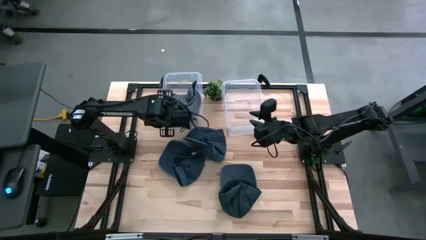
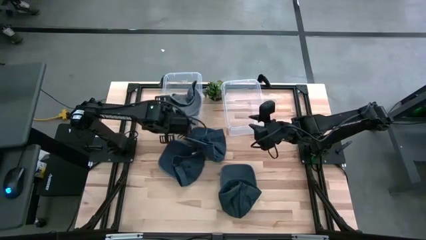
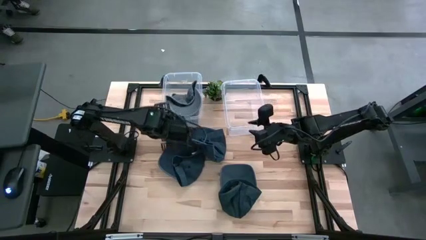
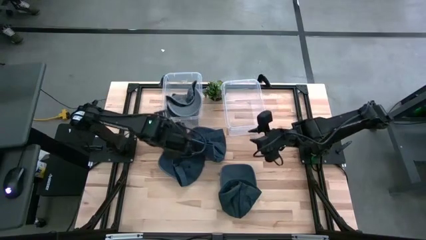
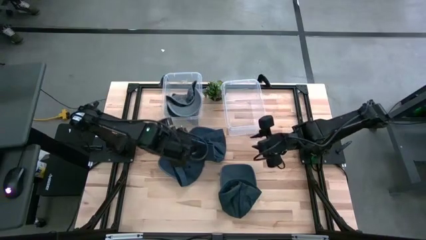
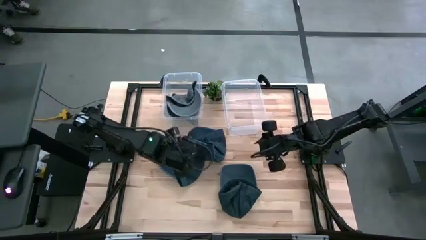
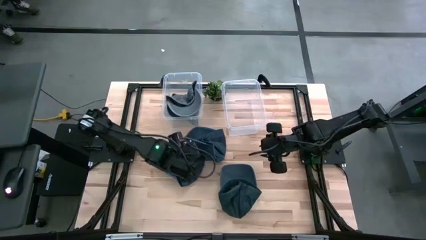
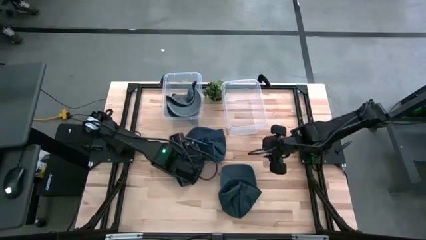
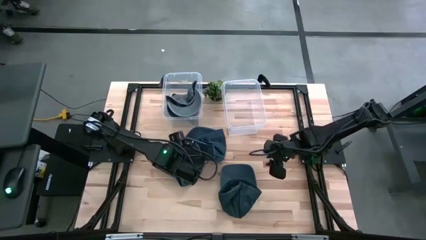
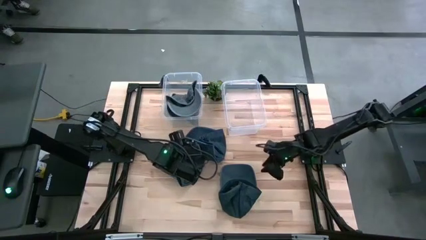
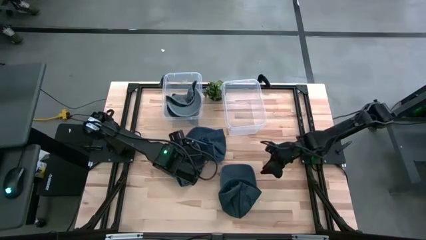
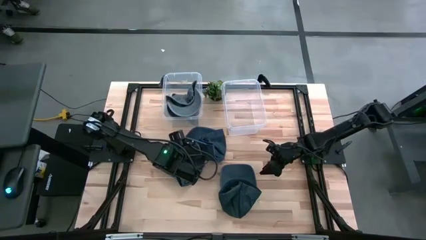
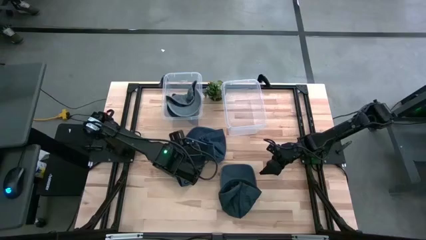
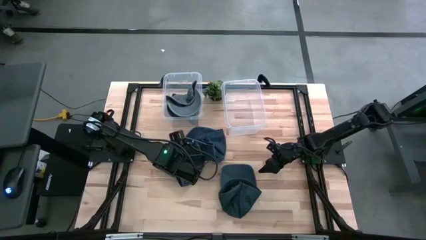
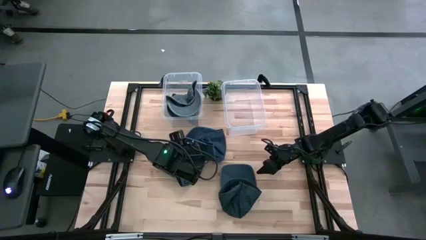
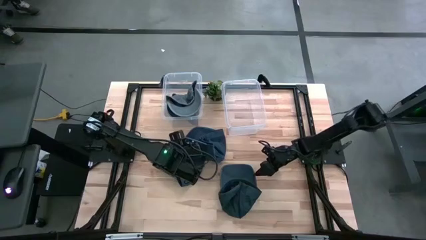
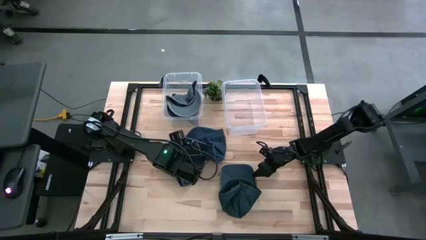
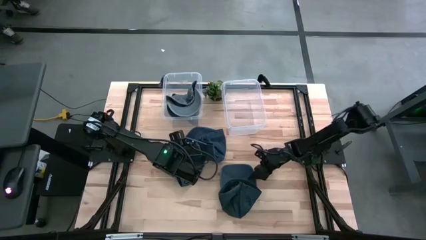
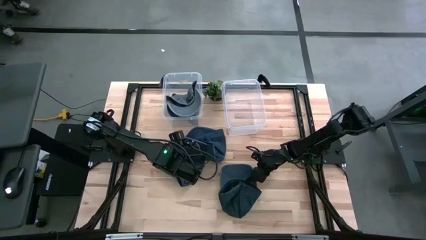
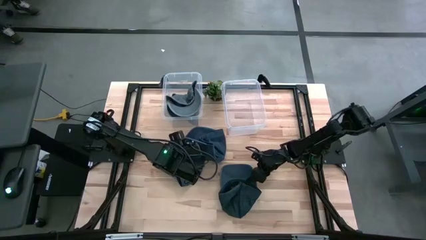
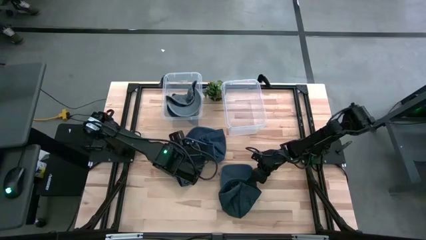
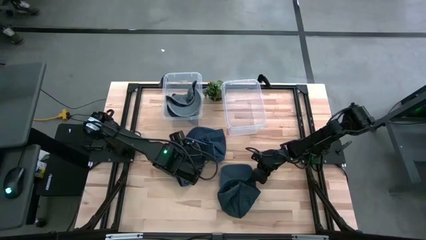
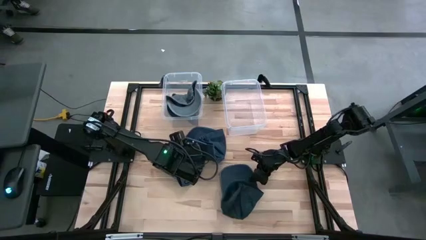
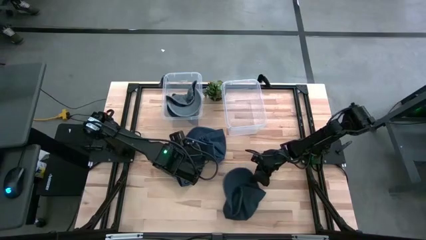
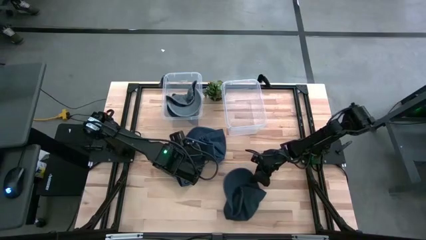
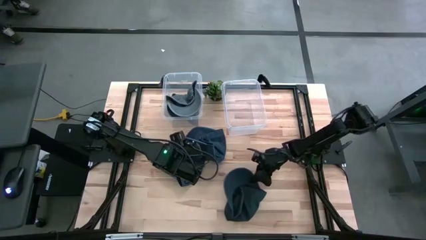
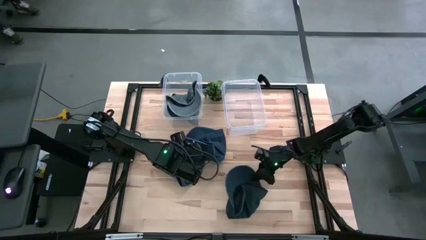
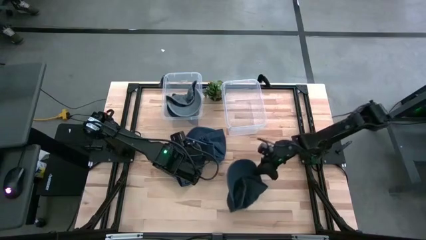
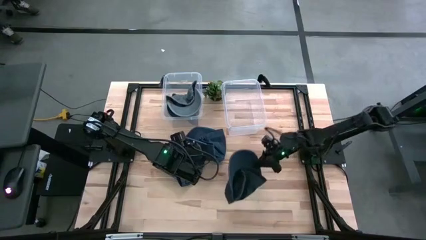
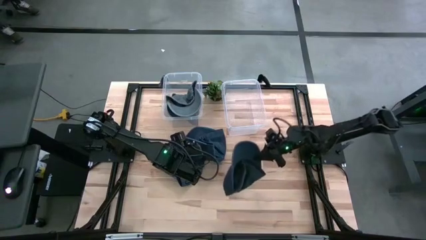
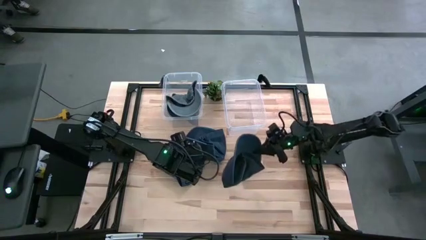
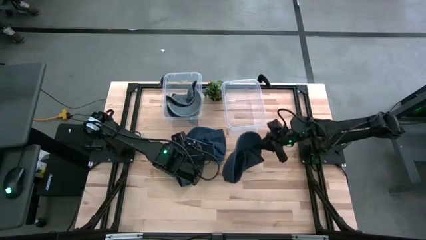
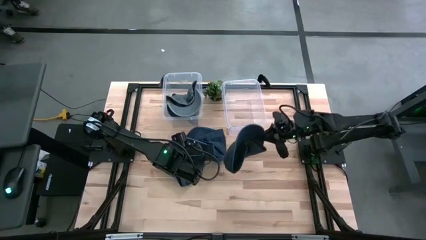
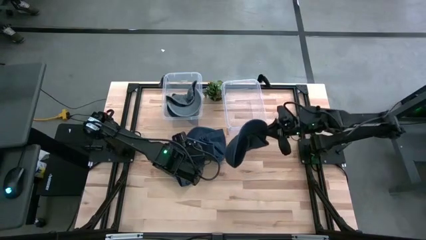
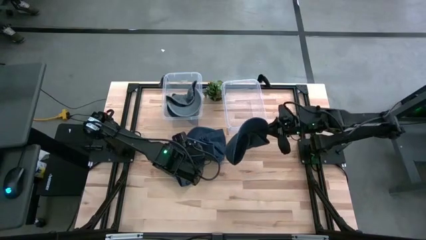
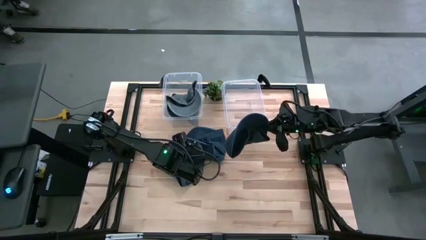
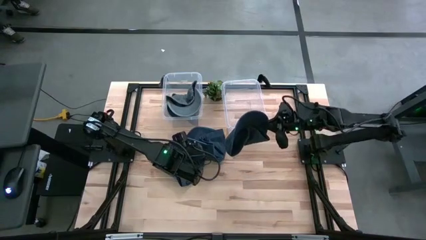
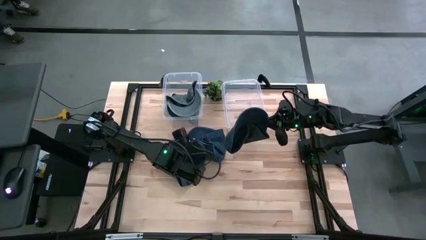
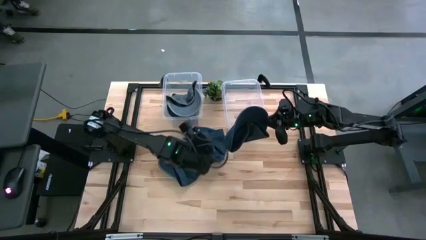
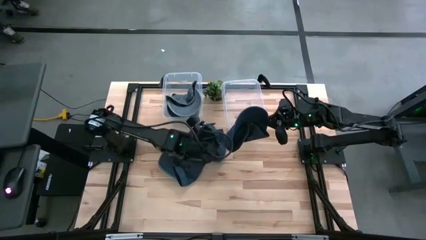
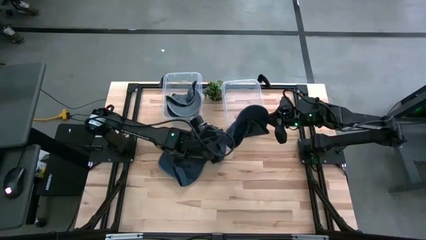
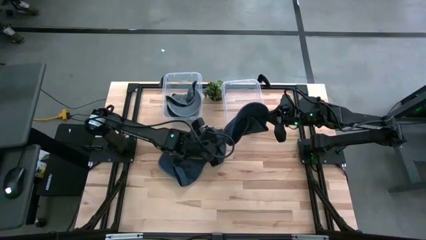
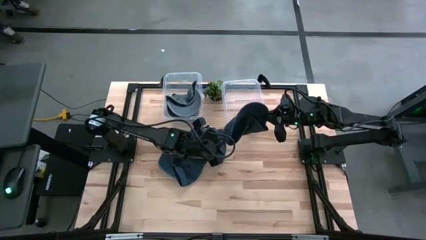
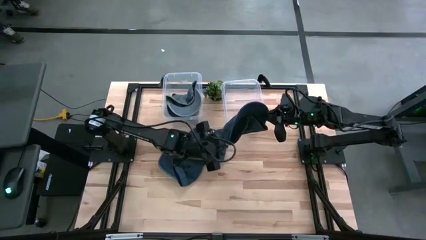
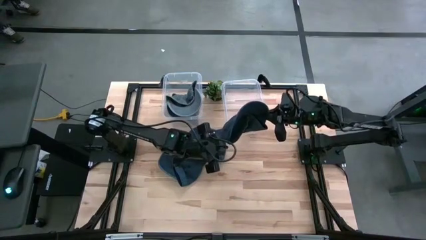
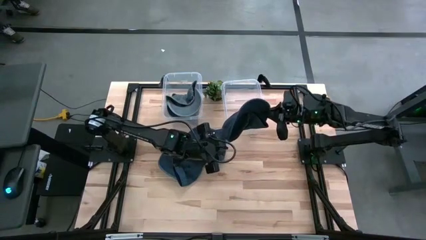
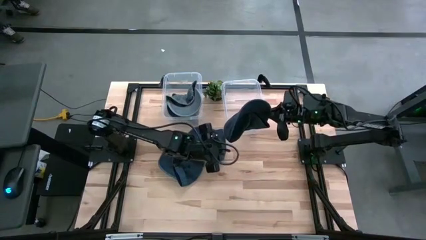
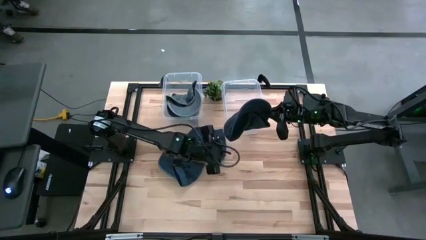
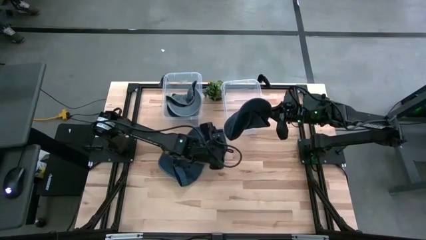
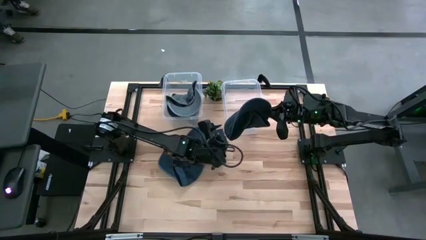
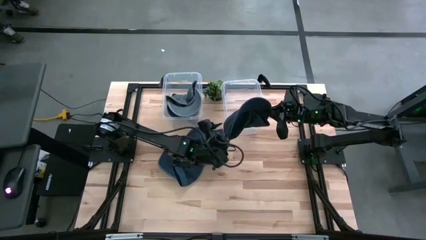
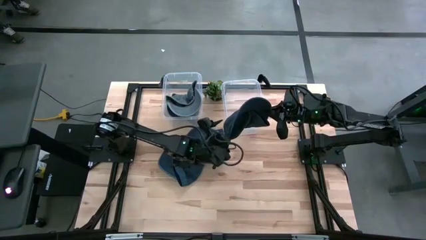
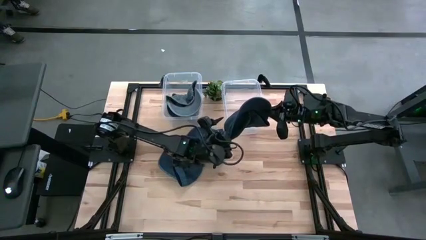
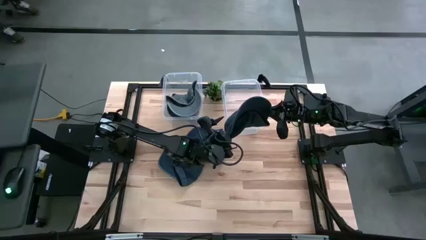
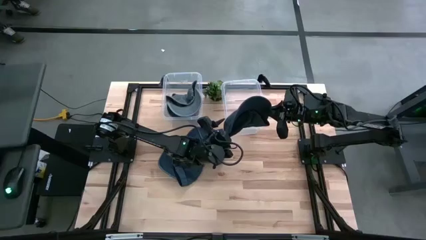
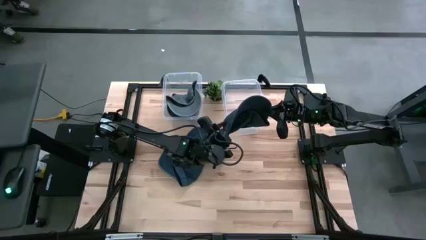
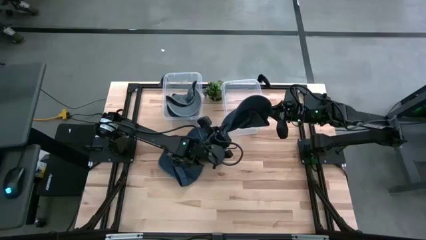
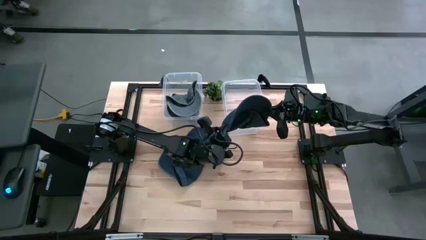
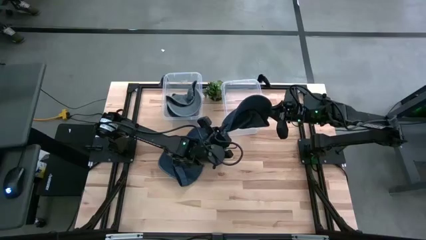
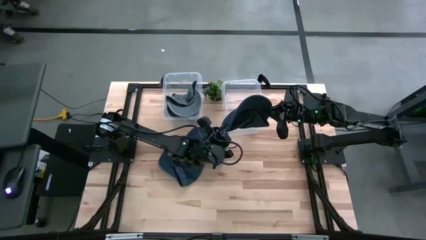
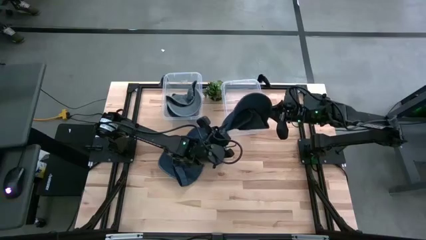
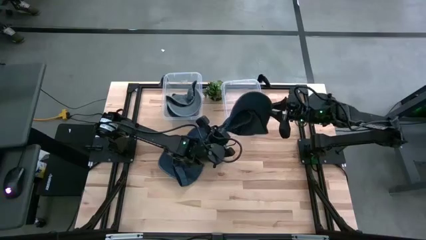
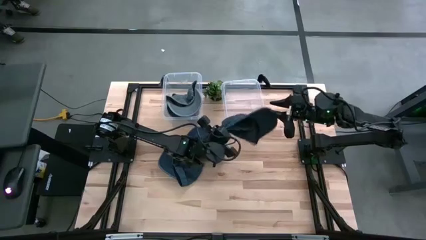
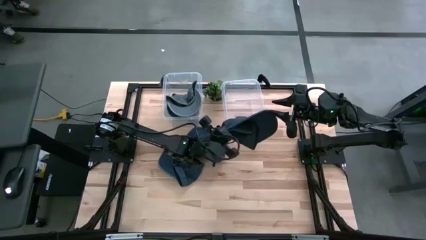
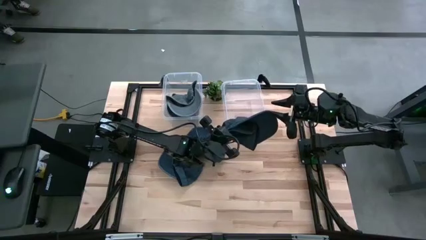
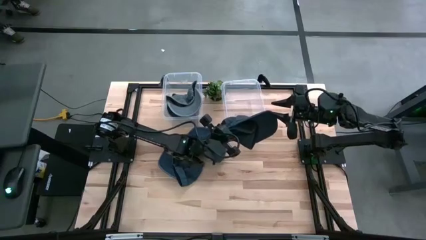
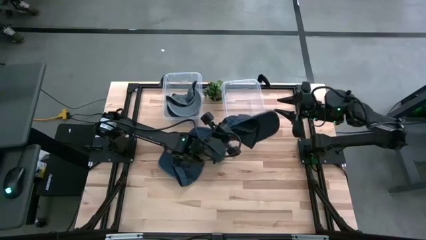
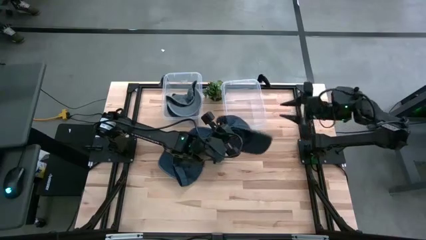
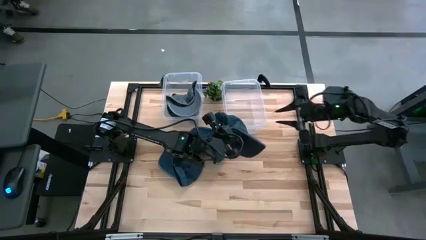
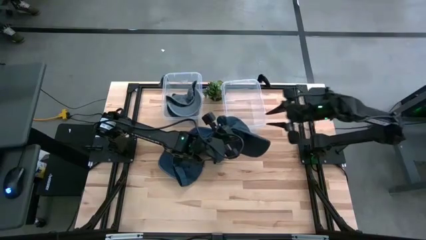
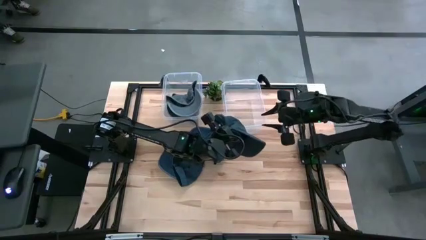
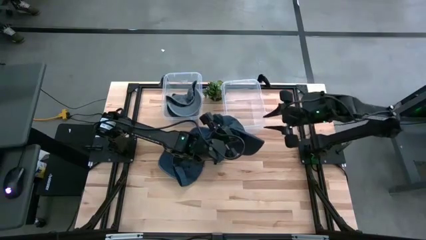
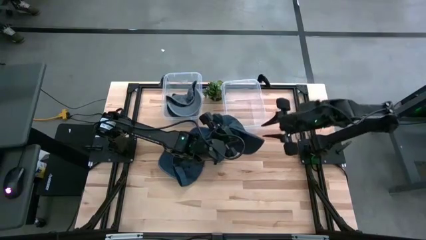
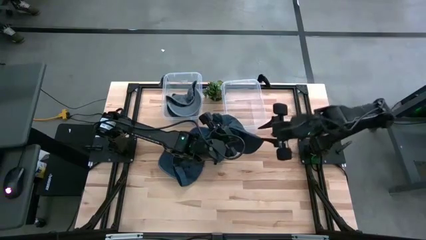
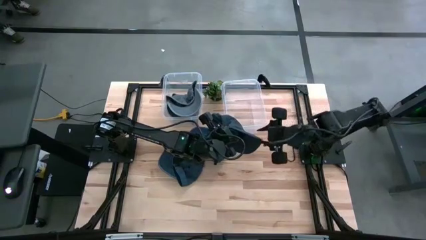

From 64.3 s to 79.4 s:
Task: Pick & Place hat
Put the bottom blue cap into the right transparent bin

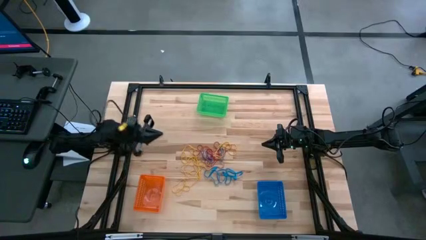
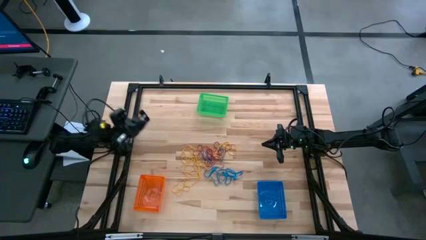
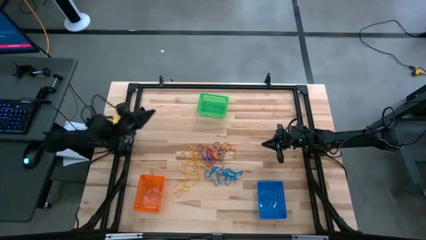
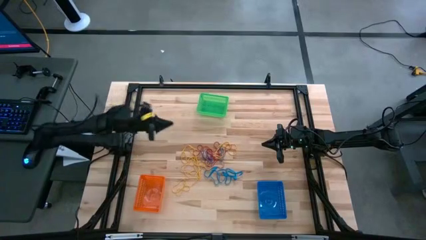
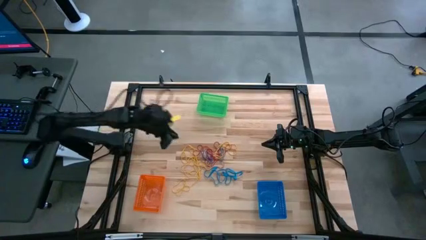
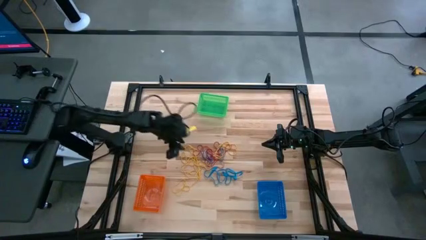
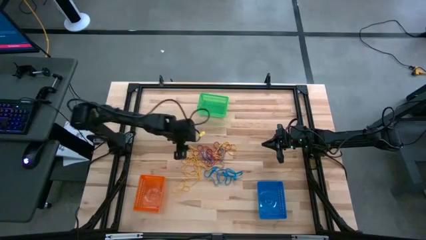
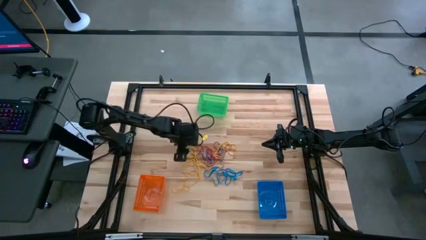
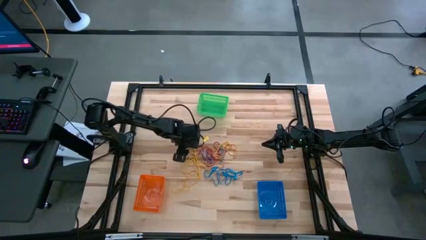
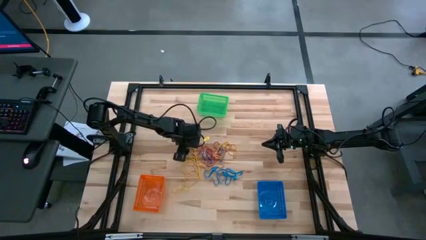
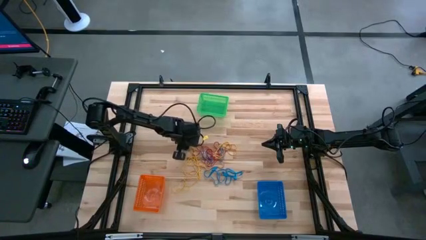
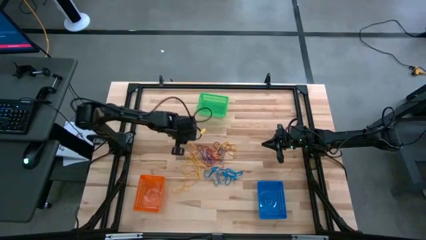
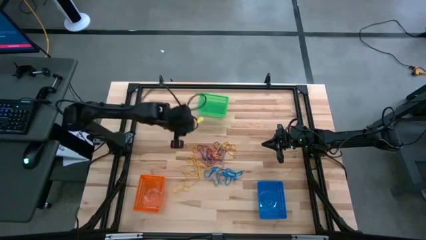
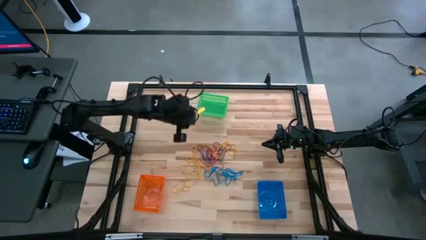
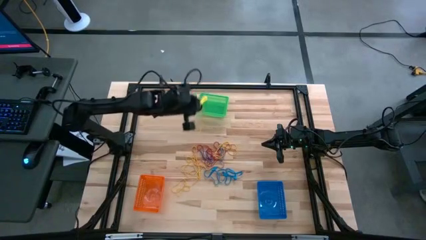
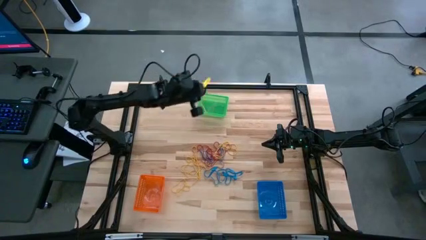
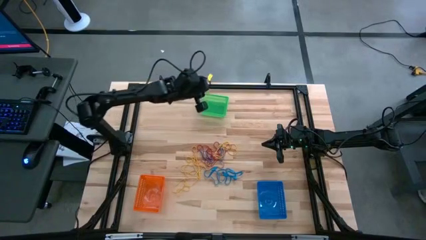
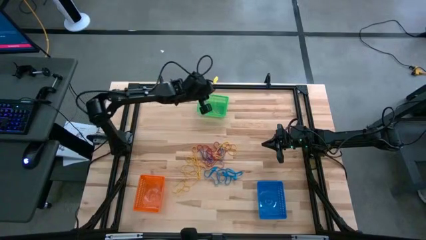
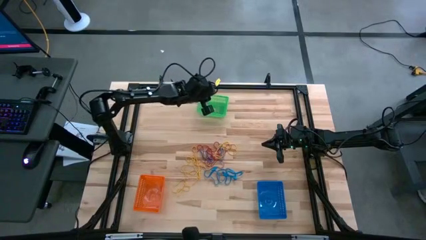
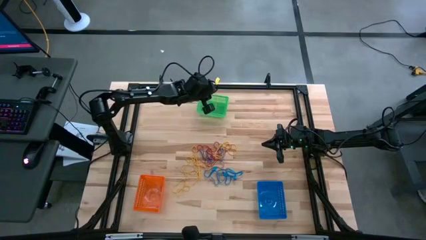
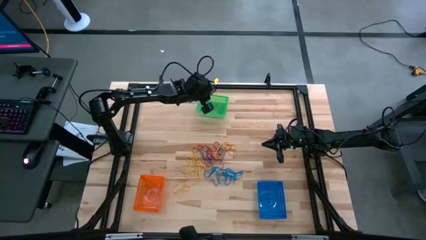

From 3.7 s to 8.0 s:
Task: Sort rubber bands into baskets
Put the yellow rubber band into the green bin
